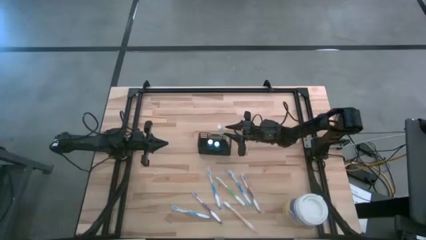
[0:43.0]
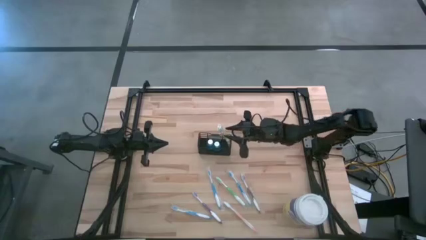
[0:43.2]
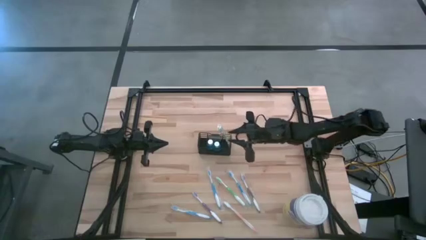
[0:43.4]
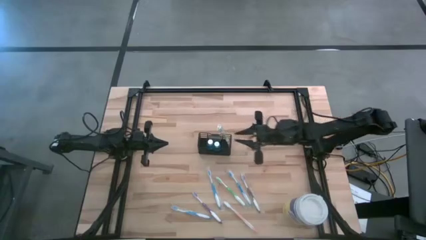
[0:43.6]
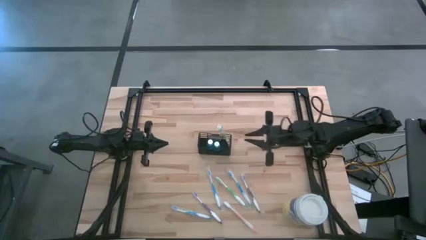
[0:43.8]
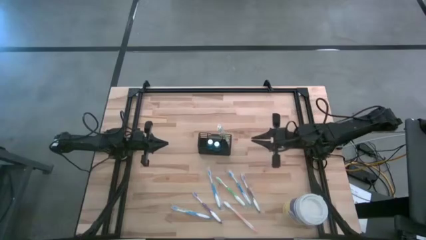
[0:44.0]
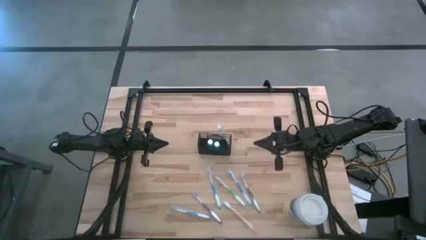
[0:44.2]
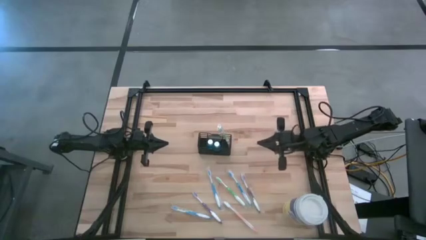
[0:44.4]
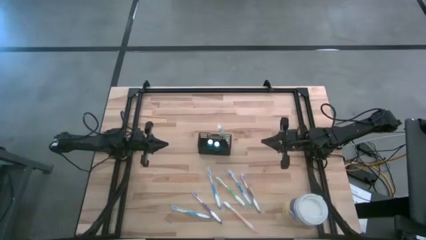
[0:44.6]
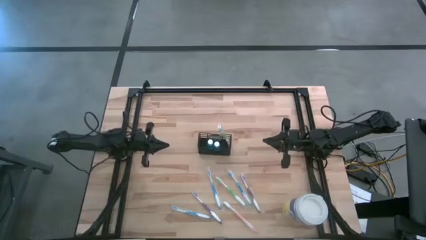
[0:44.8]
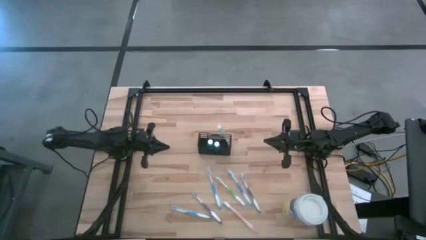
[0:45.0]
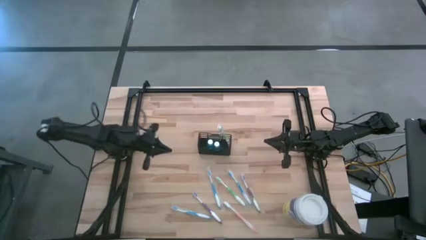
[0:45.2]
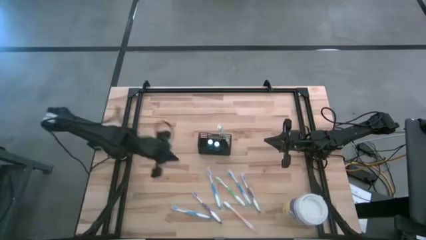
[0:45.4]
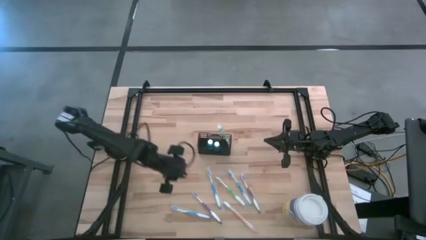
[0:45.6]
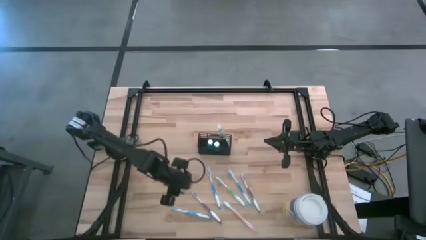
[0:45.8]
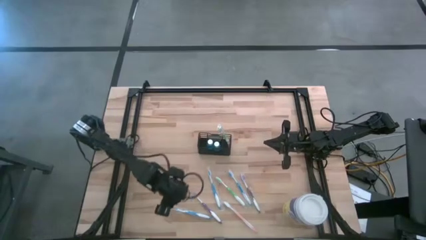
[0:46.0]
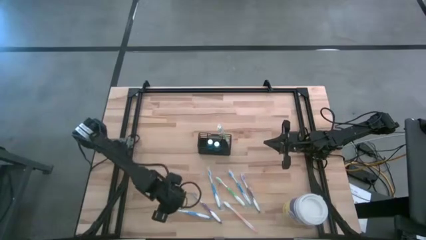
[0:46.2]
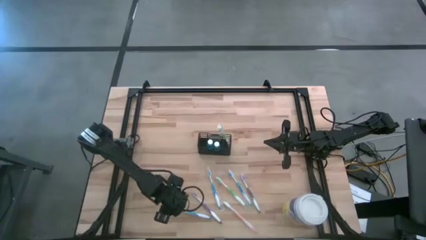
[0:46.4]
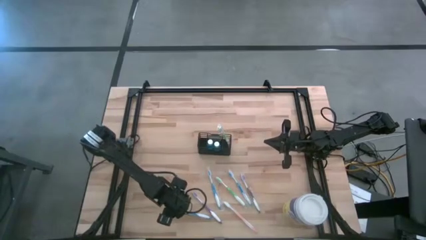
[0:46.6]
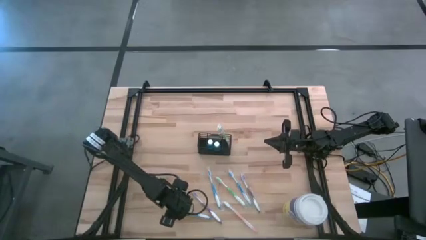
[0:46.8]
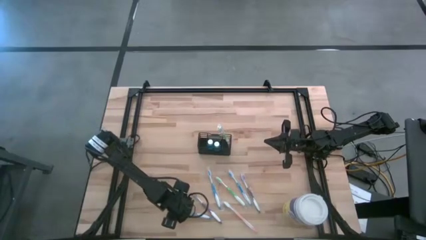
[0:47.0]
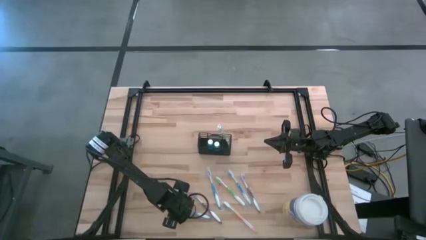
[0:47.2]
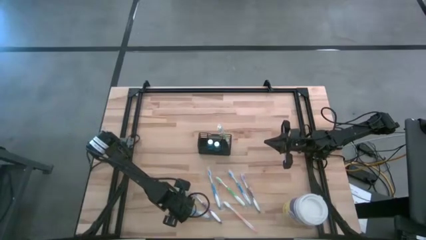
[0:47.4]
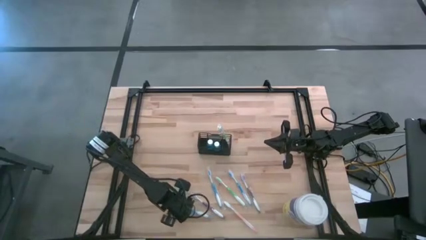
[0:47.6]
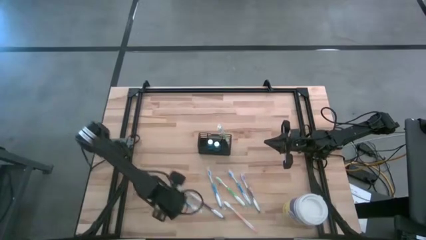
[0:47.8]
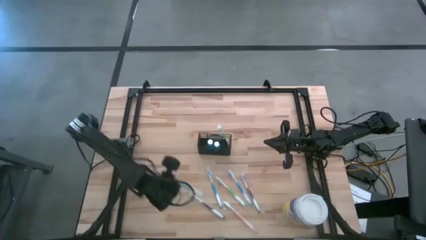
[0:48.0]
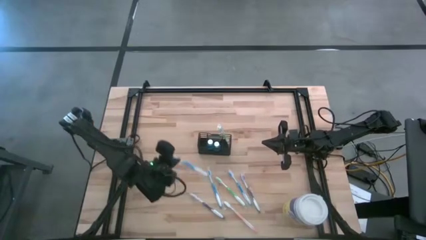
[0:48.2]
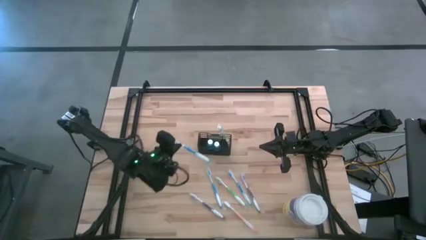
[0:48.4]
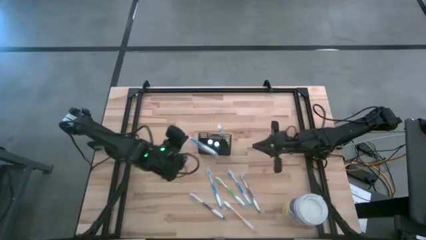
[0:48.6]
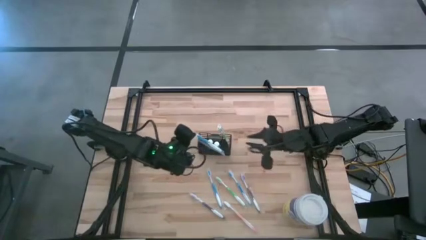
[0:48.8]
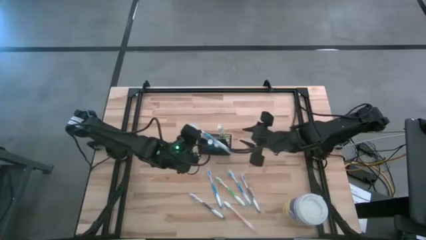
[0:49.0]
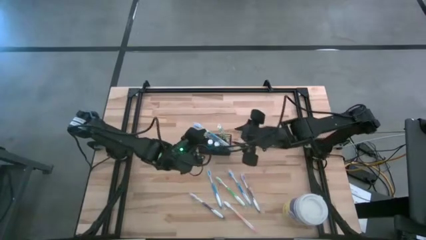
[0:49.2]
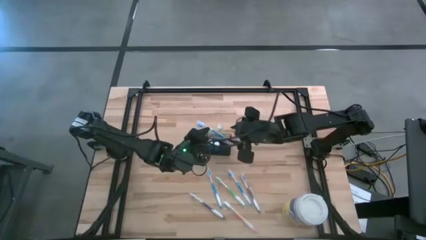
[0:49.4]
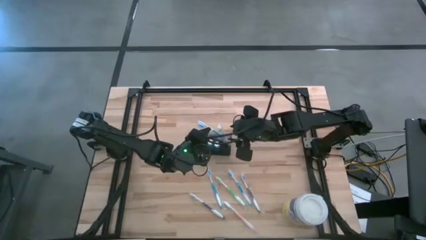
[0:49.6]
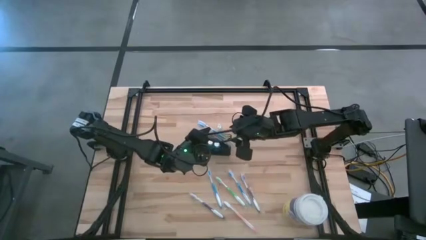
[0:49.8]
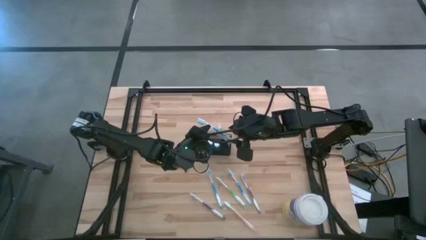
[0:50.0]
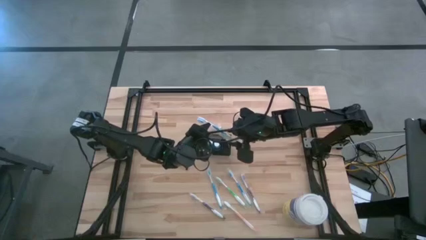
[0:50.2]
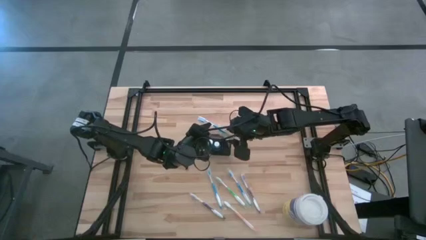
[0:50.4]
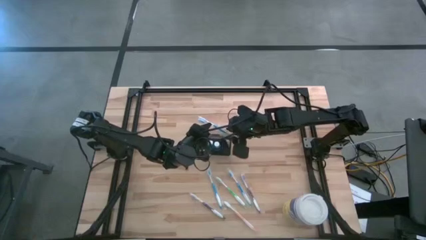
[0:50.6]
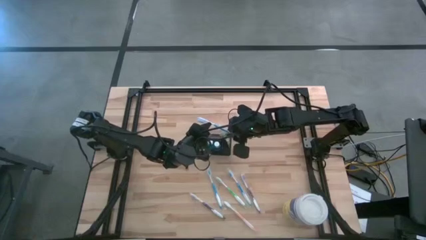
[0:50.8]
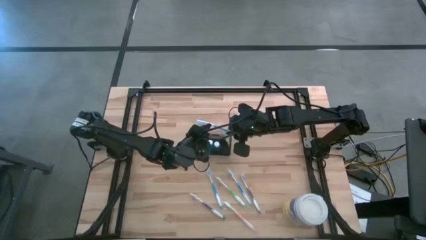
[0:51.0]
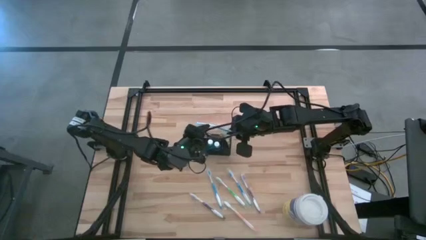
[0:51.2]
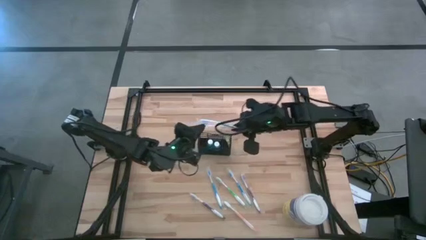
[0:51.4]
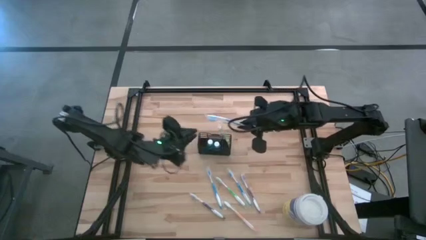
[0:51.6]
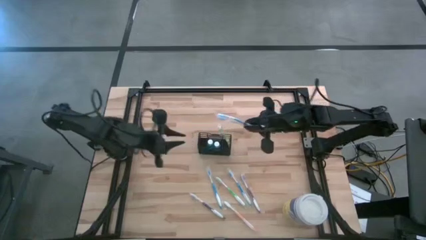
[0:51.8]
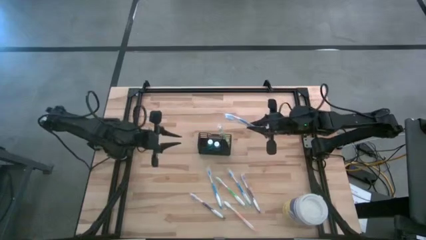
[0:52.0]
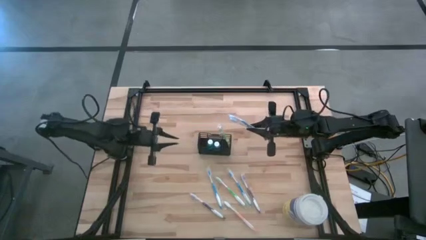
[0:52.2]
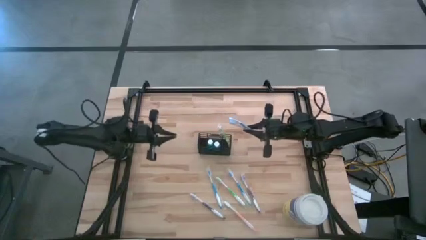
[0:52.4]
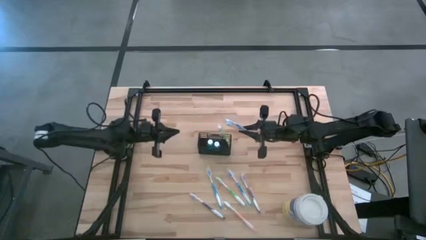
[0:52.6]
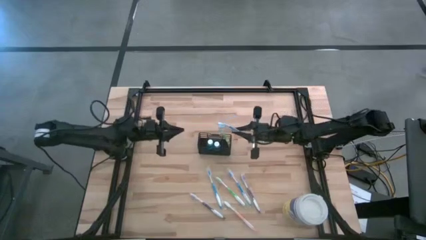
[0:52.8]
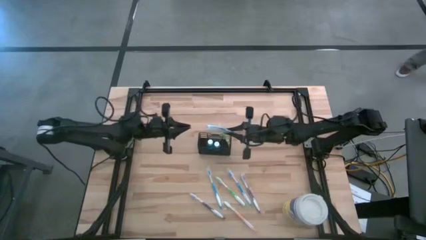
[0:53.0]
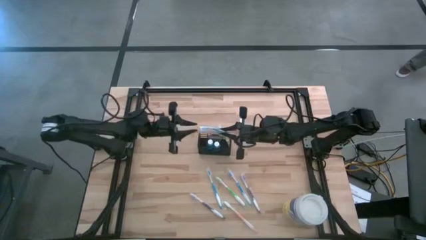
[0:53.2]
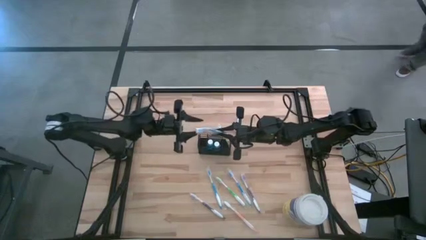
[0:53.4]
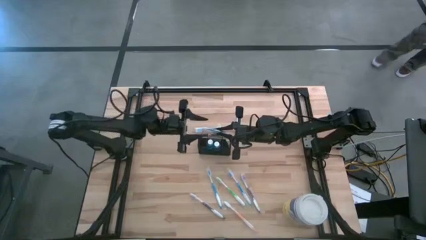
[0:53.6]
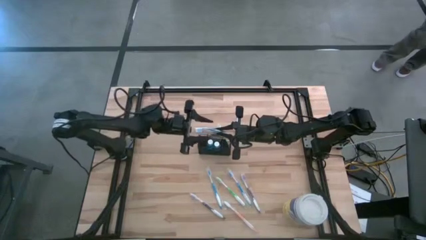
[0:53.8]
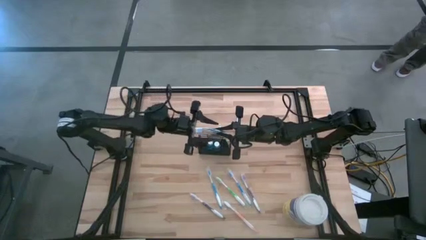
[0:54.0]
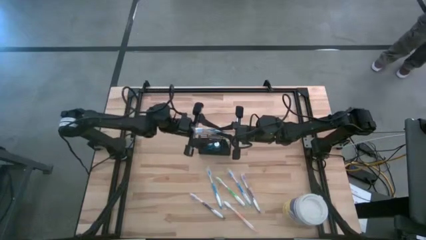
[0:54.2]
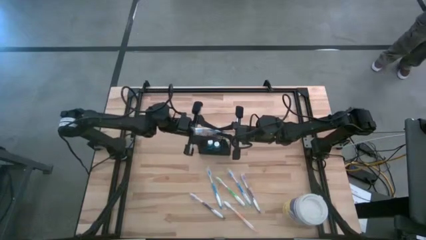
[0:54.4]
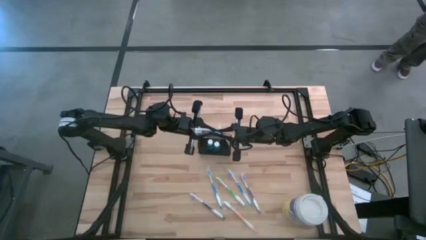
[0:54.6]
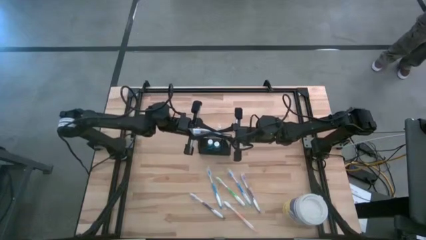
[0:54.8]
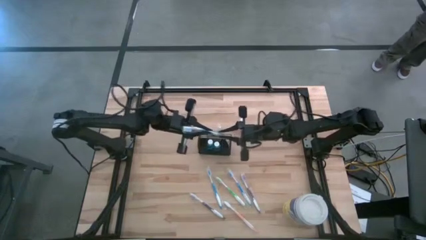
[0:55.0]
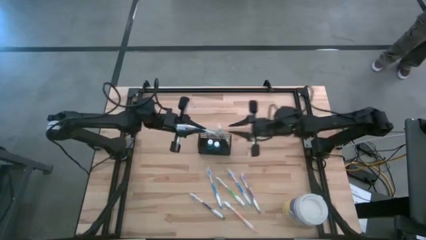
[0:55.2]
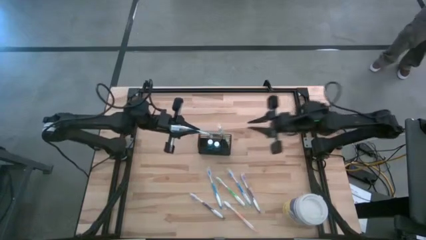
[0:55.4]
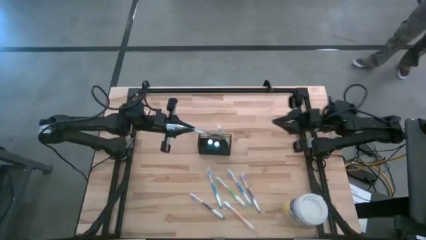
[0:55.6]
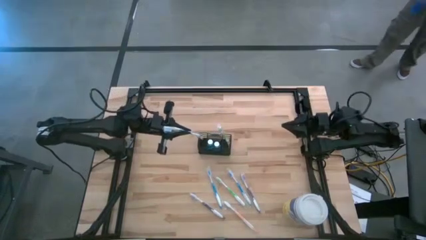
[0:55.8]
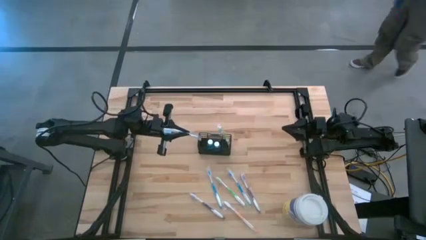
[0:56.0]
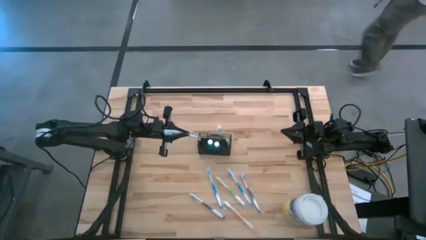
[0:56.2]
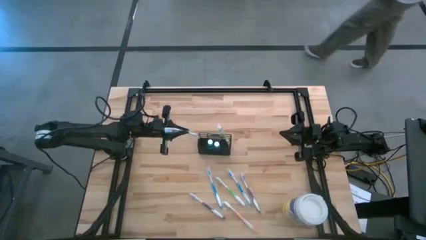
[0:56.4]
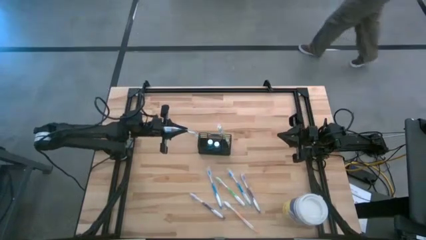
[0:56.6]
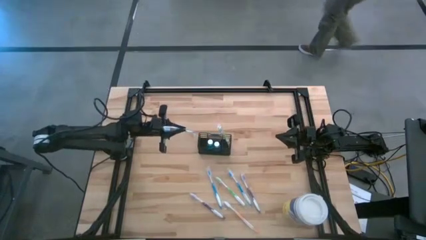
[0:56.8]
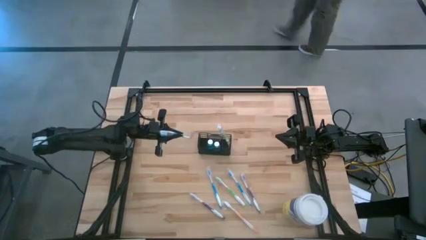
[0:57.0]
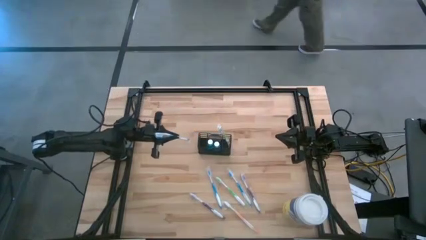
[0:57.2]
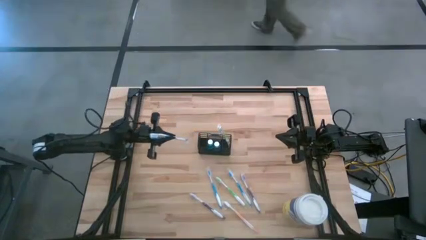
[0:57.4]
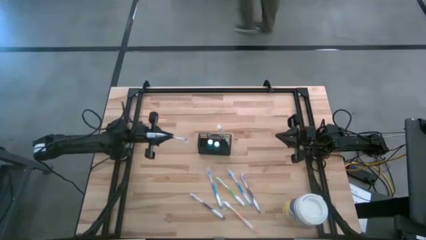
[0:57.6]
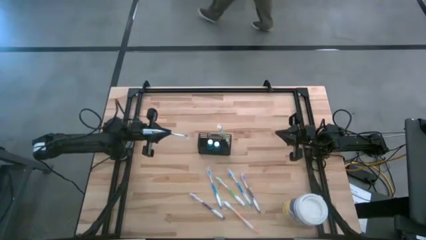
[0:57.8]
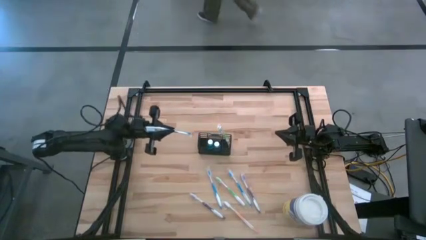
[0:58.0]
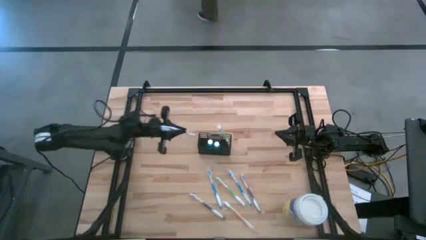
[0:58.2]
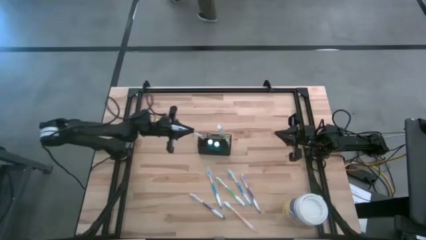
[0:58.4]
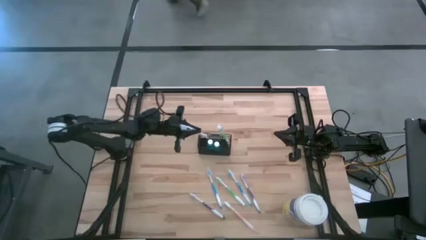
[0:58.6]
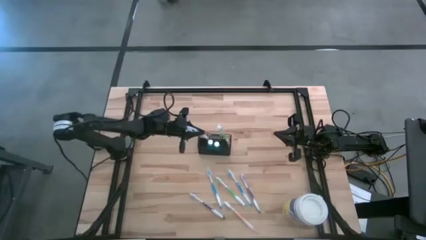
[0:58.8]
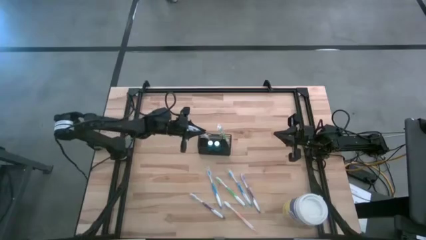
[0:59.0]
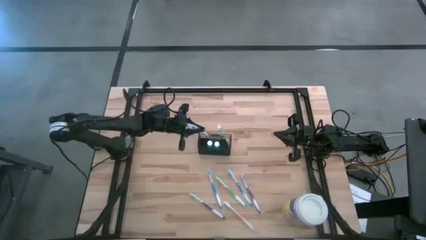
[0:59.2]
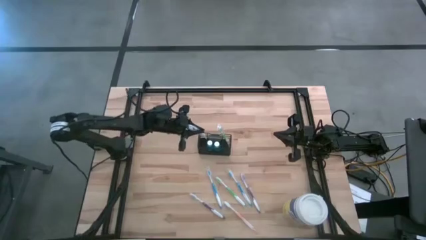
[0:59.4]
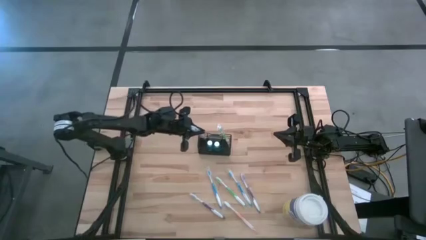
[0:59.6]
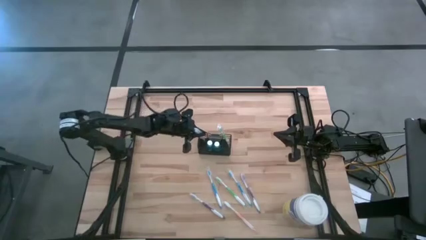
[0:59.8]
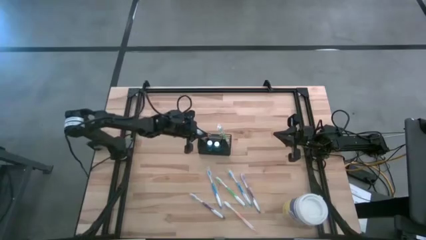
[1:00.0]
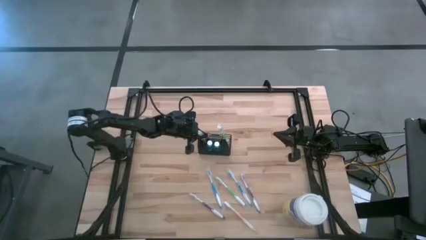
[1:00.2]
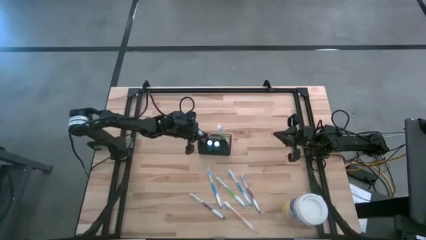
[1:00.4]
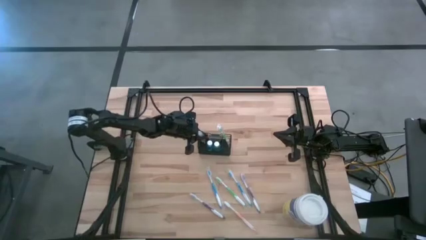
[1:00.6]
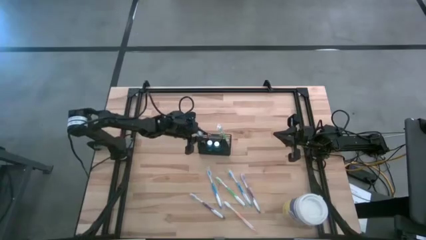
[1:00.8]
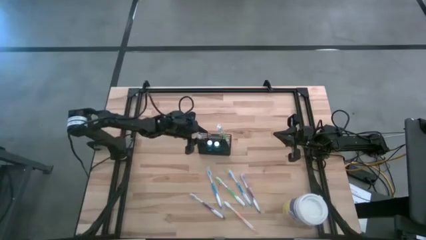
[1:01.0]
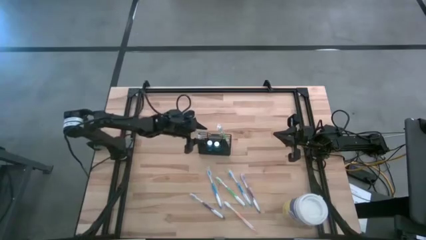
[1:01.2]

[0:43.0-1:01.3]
Task: Pick & Place toothbrushing station
Put the left blue toothbrush into the black wire organizer
